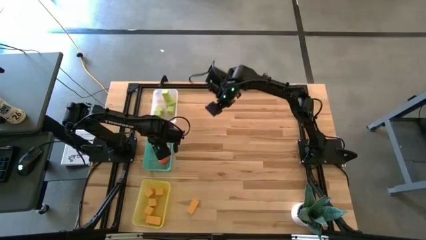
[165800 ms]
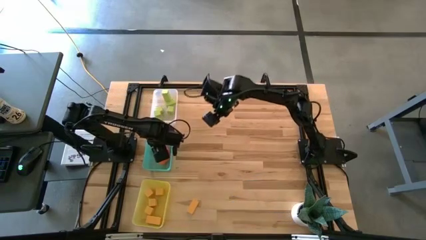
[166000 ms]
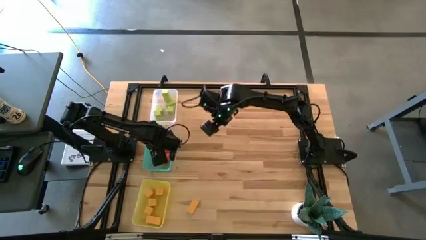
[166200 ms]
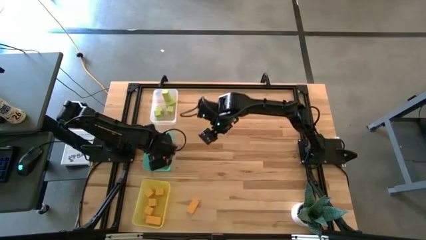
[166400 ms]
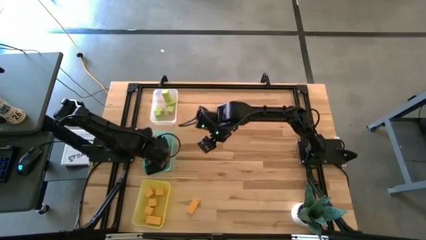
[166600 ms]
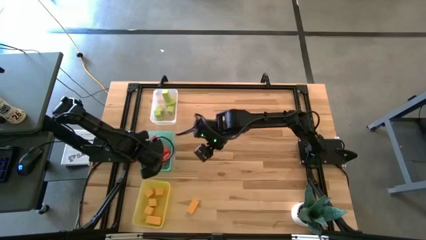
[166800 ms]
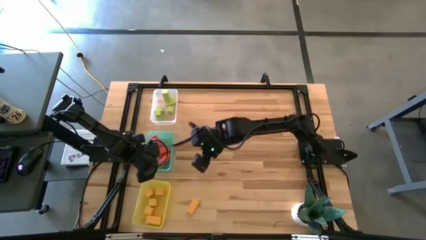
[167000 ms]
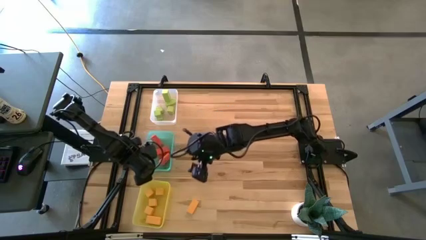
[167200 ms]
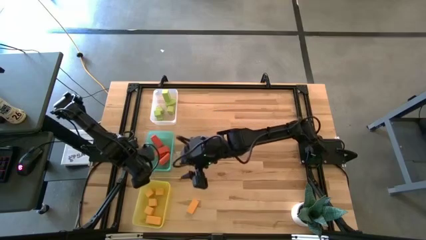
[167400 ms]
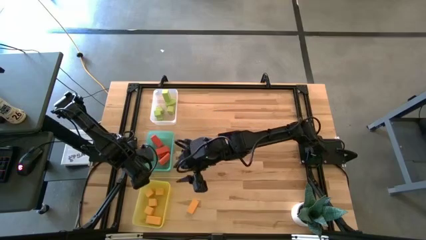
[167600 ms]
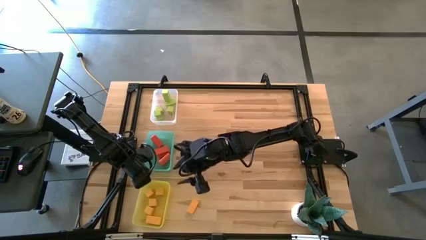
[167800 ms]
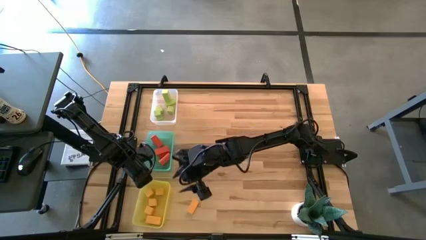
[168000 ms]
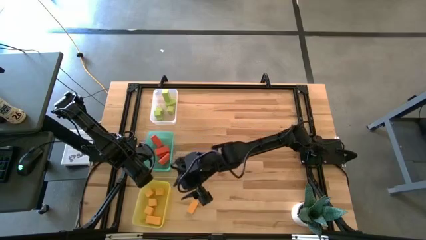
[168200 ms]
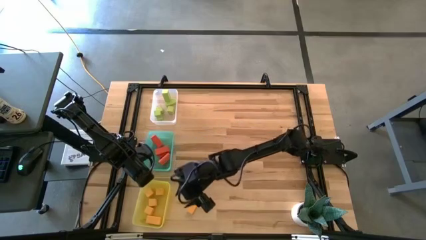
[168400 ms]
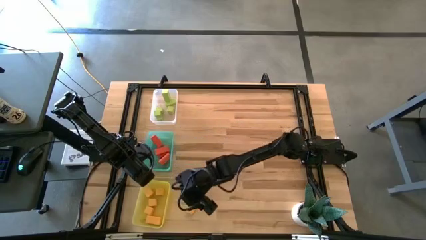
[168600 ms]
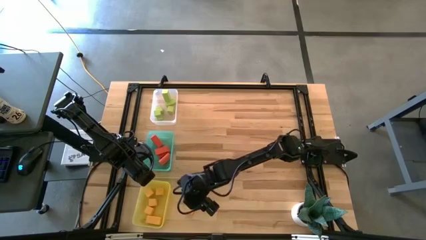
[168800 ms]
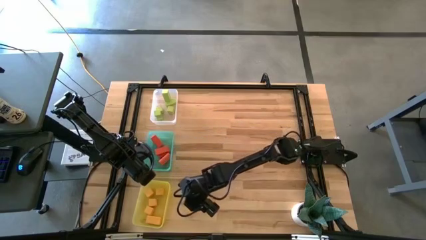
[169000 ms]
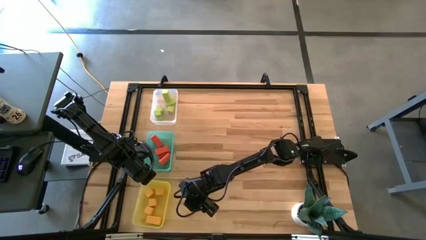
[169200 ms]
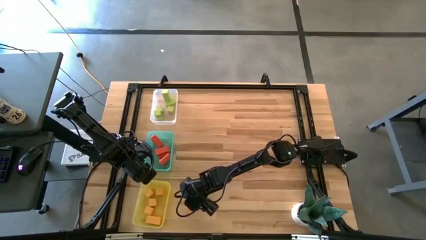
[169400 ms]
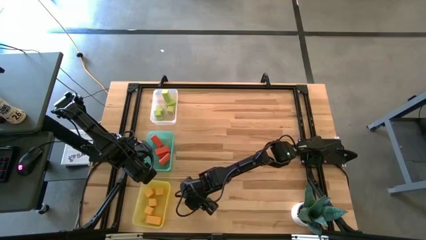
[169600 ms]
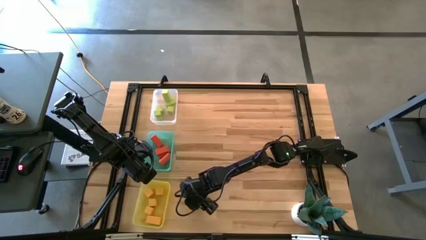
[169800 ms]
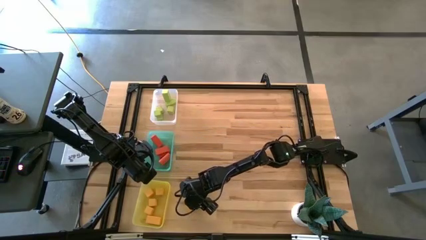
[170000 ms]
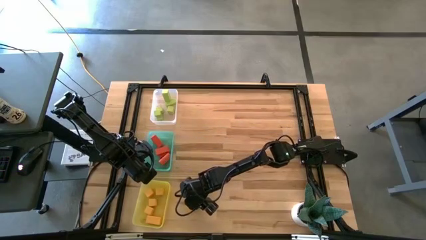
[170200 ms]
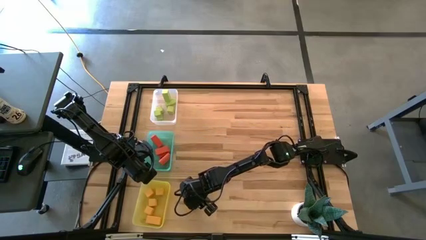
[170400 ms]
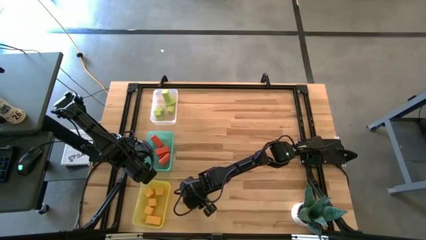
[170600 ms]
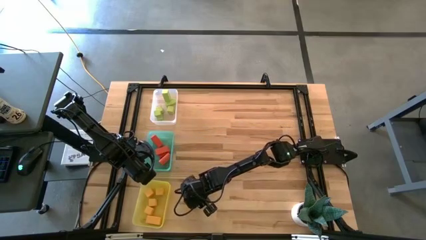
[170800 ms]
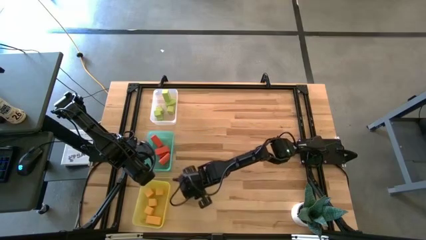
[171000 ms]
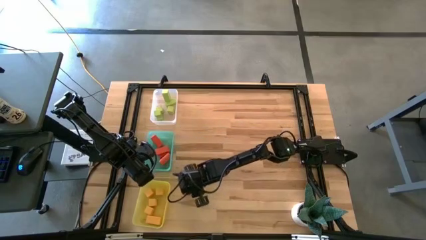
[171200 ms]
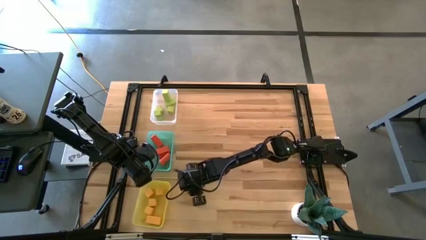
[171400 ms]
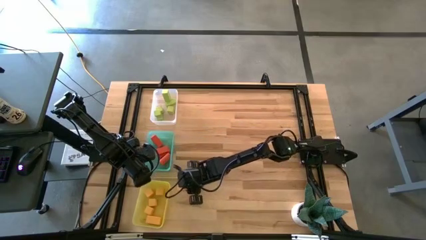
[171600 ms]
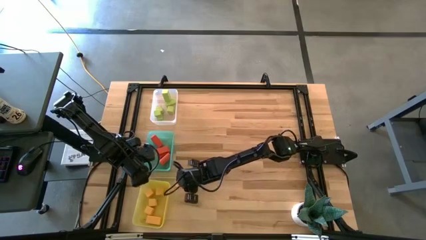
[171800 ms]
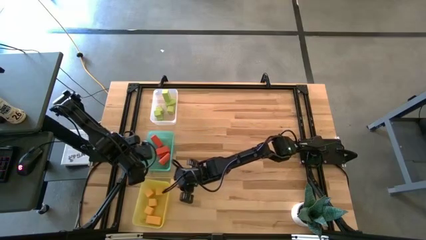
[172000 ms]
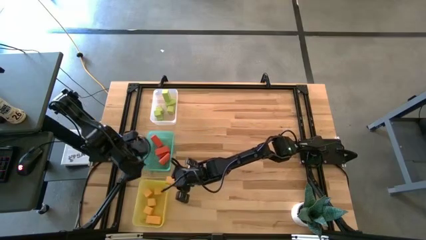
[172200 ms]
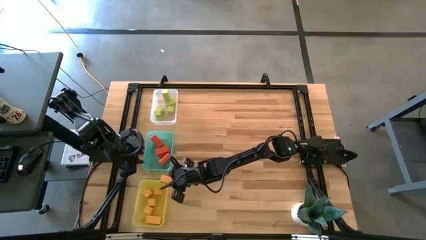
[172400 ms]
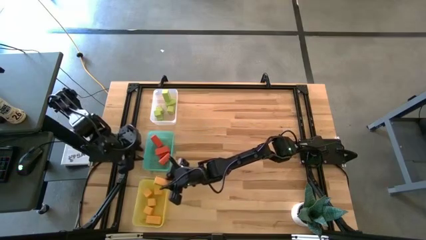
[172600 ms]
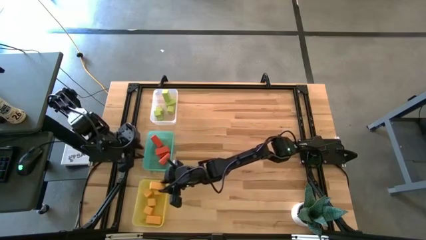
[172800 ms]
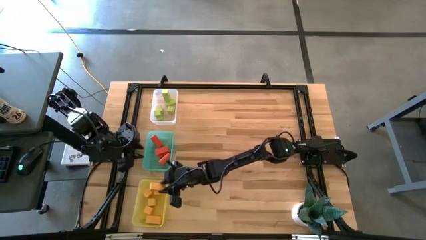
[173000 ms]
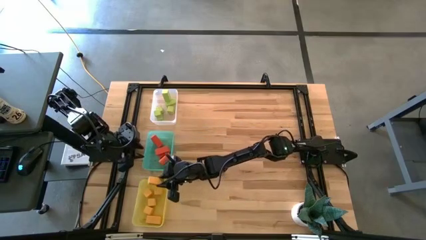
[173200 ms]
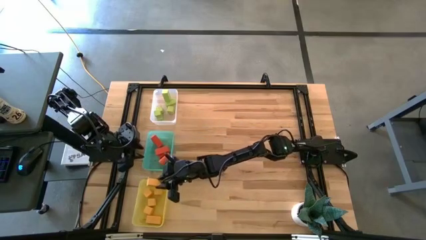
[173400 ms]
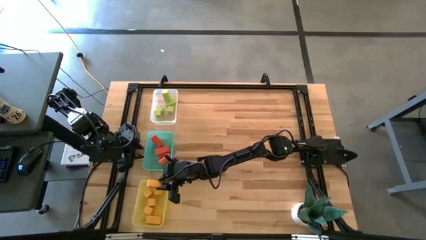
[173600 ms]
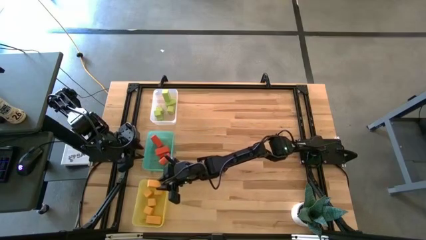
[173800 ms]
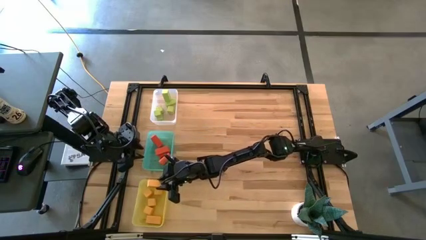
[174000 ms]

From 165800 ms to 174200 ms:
Task: Sort & place blocks by color
Put the yellow rectangular block into the yellow bin

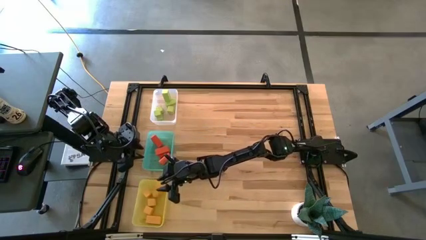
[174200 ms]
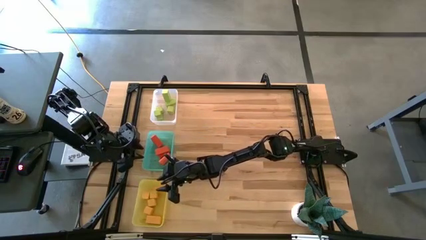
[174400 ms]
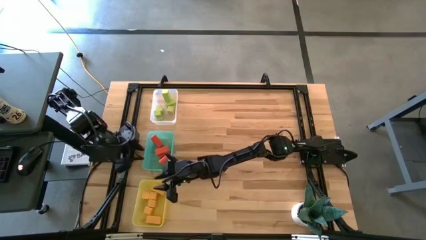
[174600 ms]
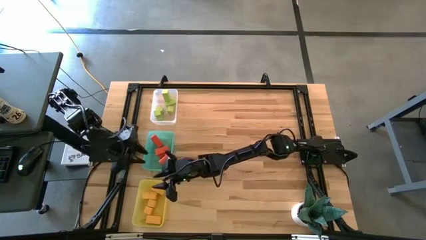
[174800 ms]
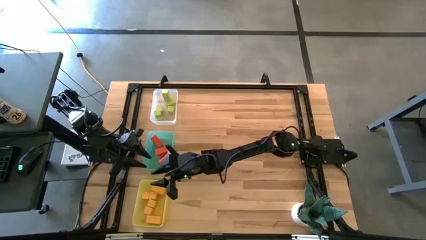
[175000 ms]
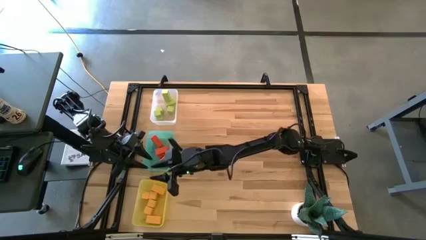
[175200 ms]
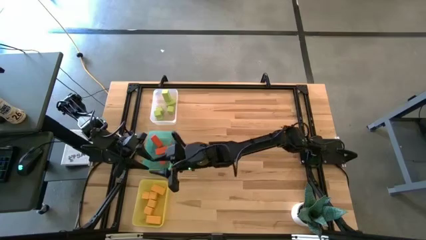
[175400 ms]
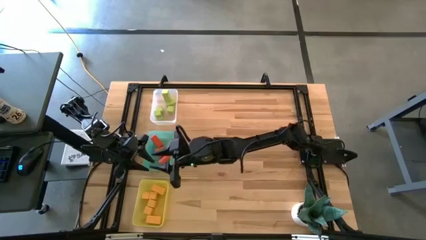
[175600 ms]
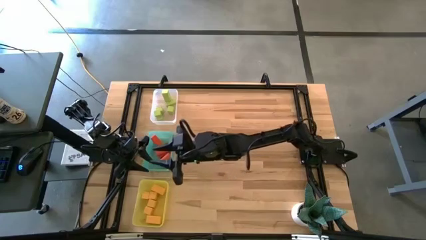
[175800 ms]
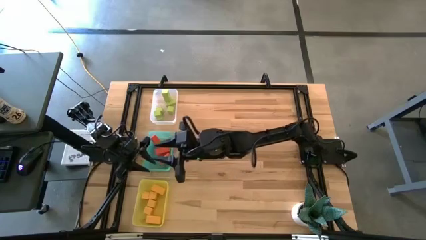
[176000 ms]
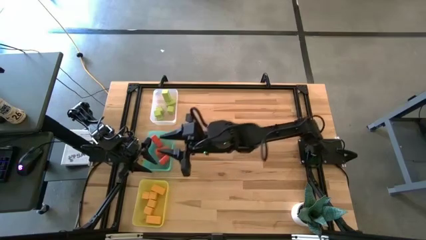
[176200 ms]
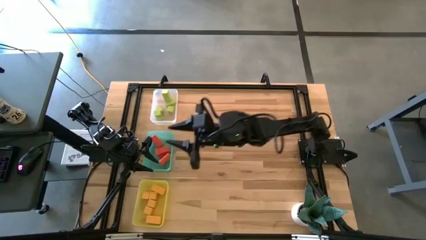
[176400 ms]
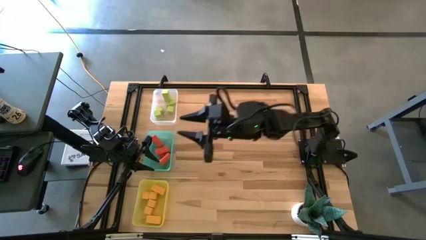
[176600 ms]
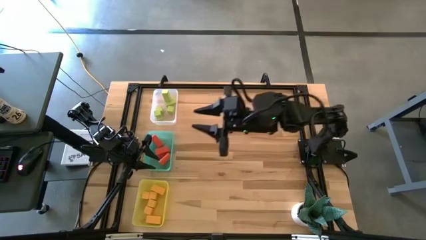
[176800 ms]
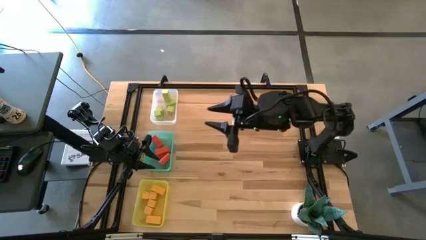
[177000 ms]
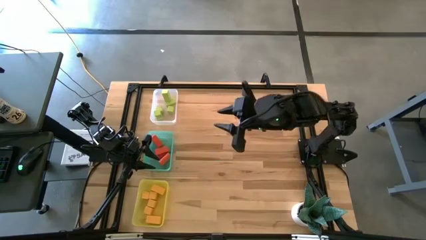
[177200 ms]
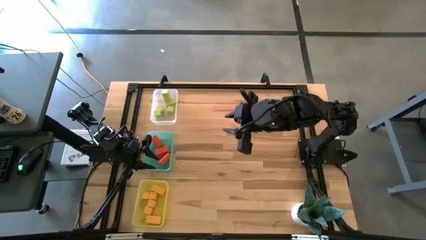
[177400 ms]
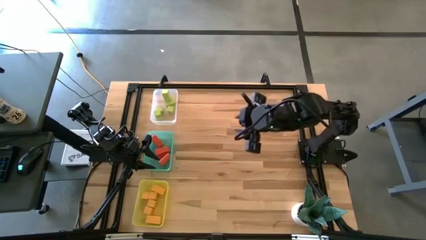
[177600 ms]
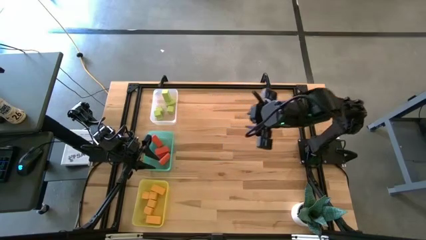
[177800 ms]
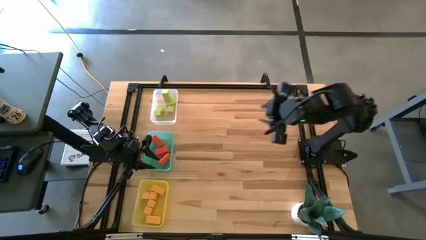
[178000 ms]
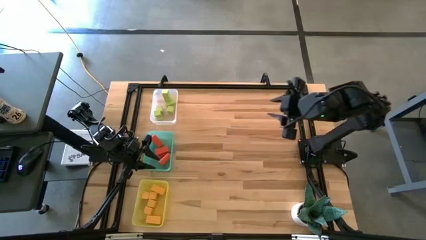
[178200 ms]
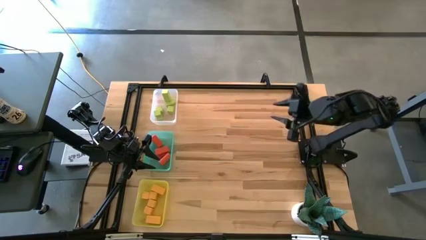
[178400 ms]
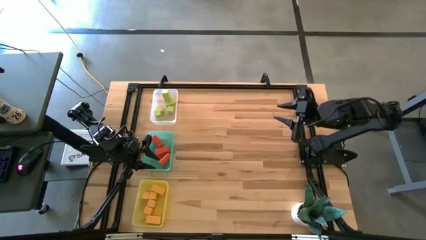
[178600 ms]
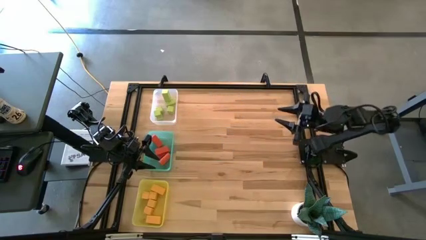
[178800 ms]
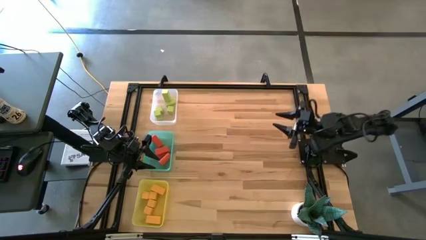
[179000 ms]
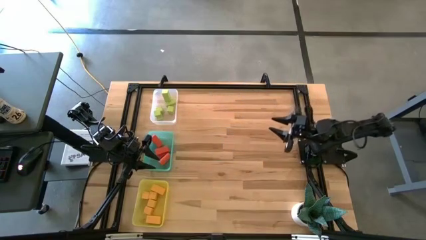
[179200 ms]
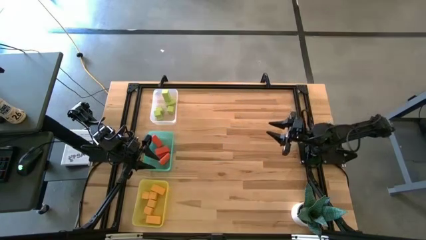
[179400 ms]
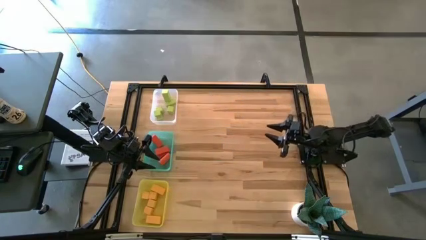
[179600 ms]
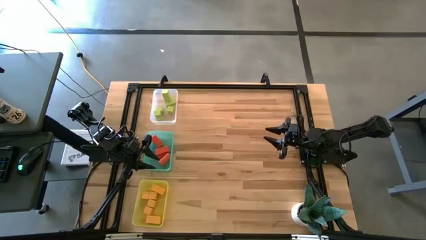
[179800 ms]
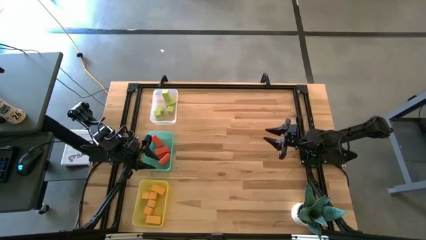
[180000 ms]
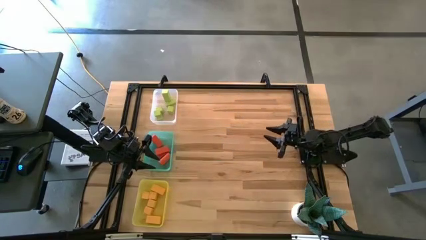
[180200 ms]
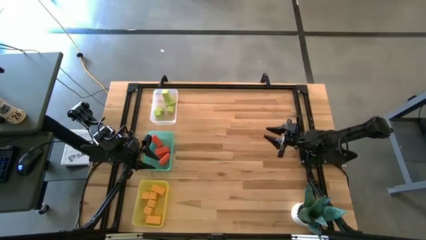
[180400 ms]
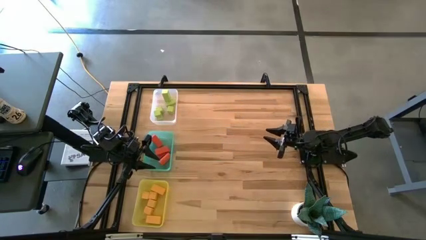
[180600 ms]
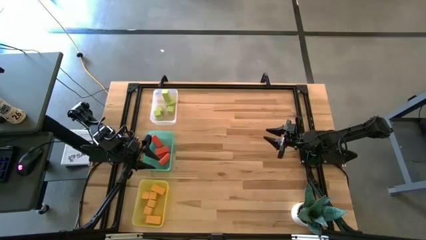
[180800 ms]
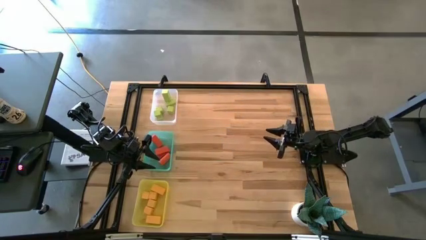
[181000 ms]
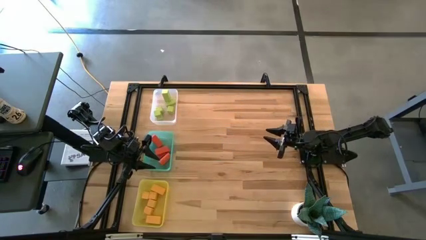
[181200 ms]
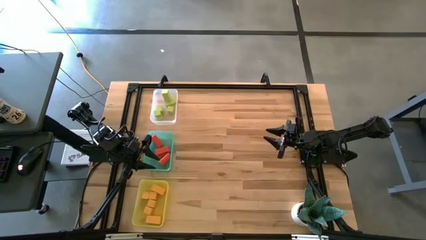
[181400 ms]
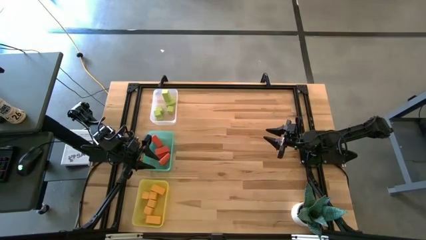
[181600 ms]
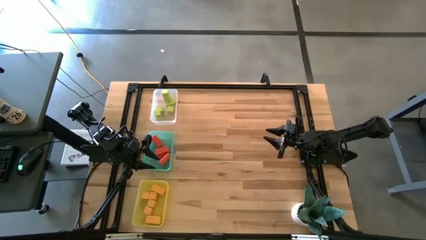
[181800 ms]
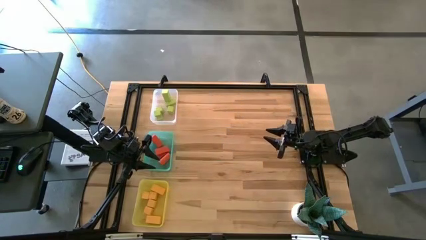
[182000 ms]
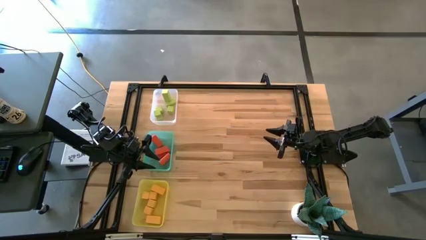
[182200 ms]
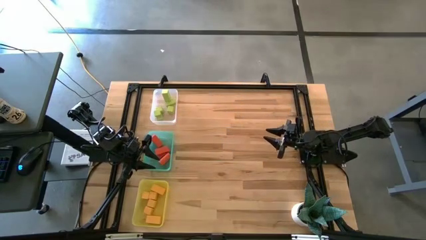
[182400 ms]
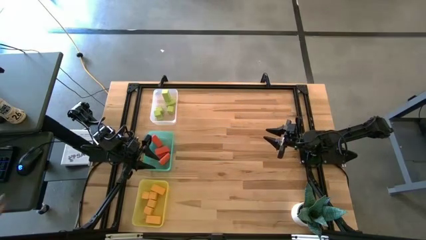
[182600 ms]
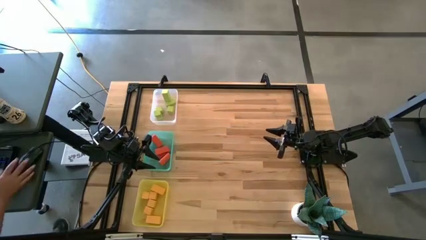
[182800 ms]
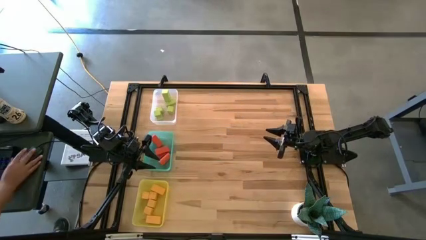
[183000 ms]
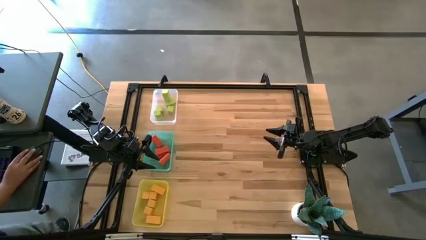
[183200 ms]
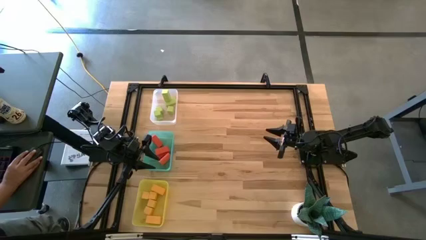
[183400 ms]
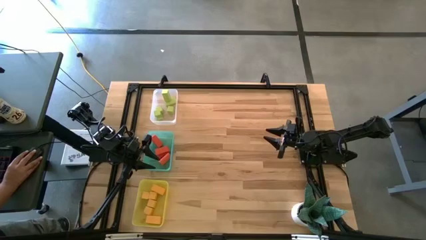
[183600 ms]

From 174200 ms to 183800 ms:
Return to Home Position
